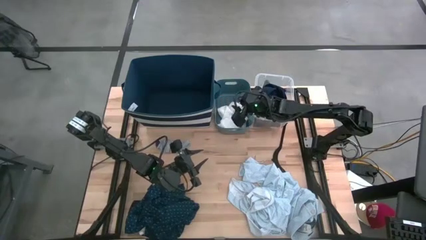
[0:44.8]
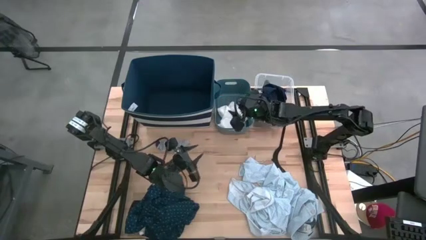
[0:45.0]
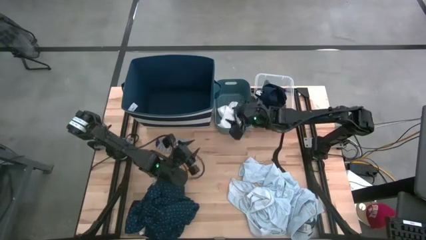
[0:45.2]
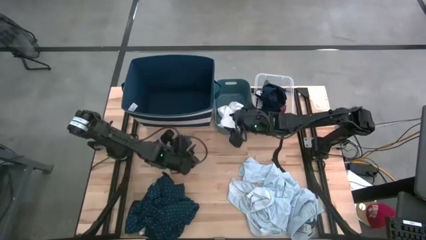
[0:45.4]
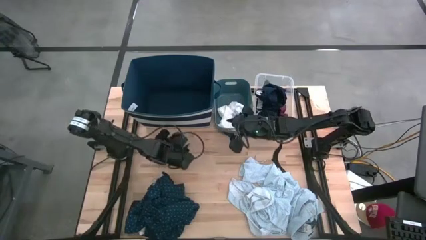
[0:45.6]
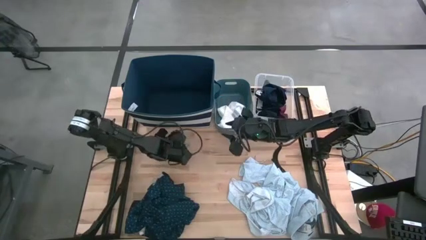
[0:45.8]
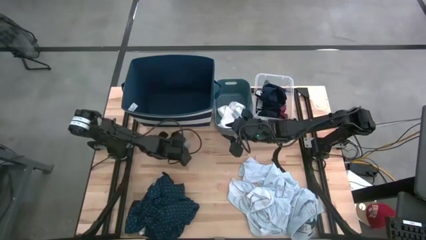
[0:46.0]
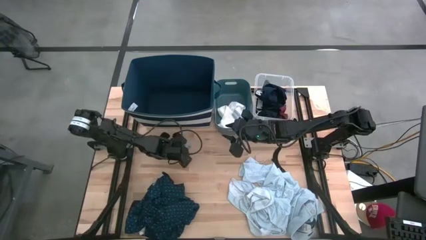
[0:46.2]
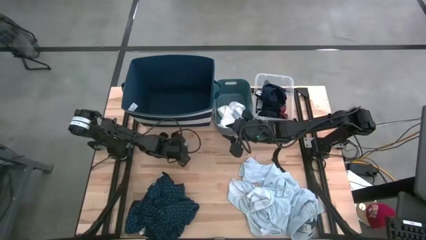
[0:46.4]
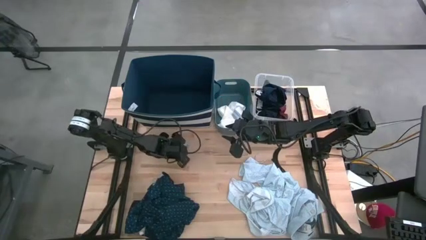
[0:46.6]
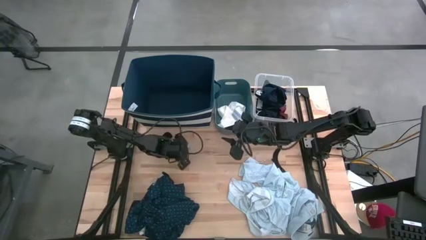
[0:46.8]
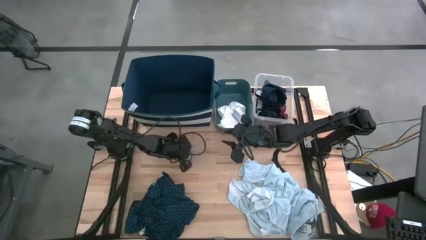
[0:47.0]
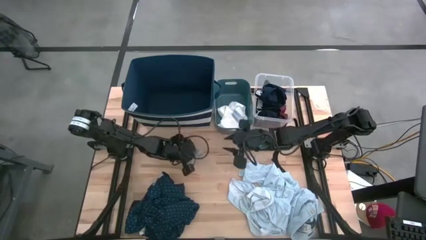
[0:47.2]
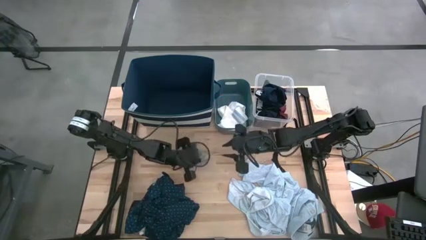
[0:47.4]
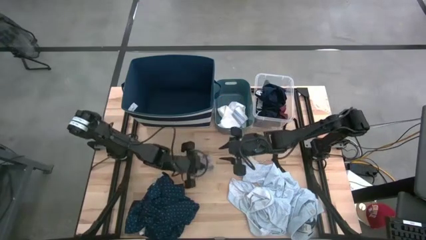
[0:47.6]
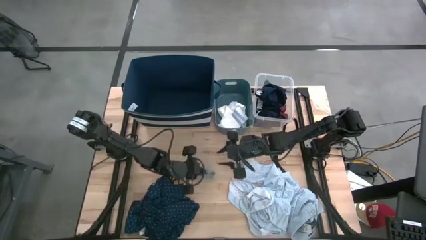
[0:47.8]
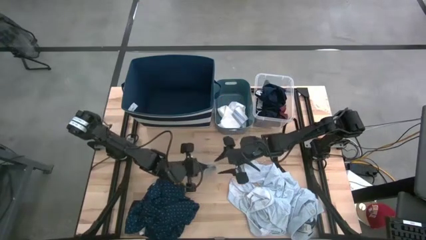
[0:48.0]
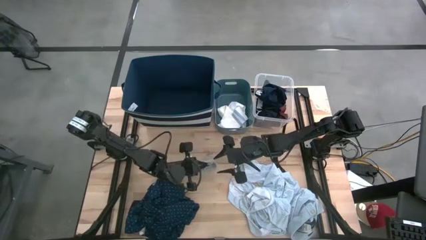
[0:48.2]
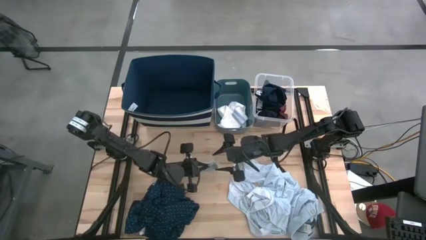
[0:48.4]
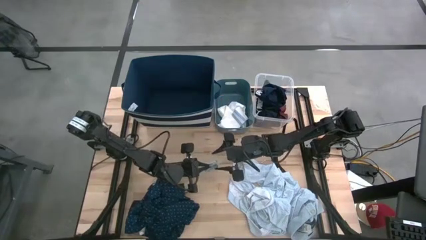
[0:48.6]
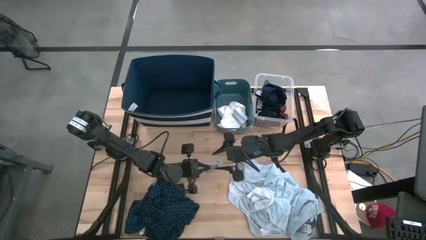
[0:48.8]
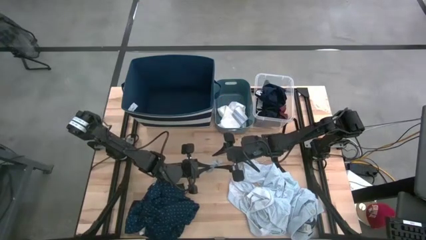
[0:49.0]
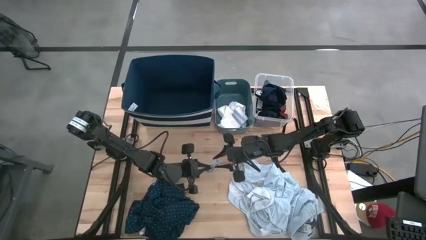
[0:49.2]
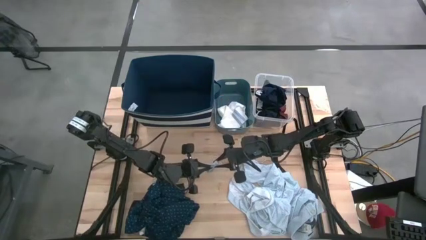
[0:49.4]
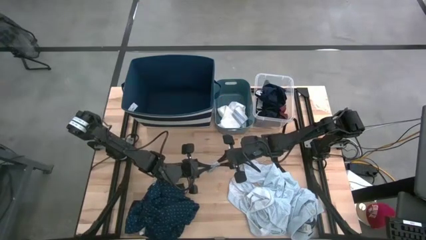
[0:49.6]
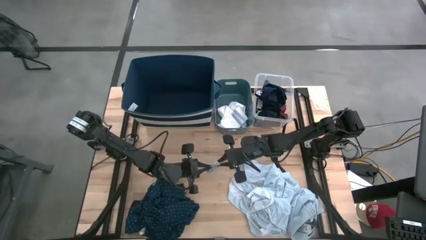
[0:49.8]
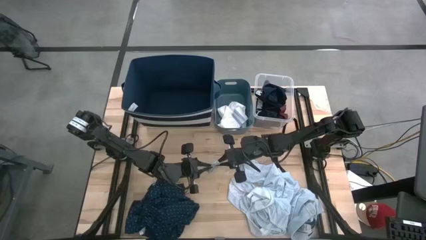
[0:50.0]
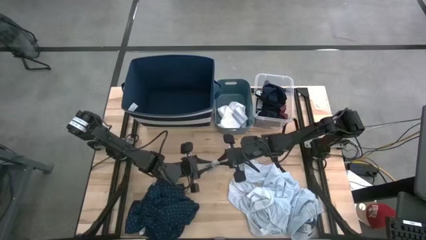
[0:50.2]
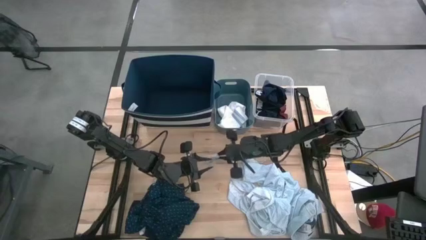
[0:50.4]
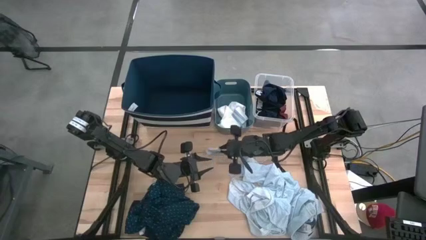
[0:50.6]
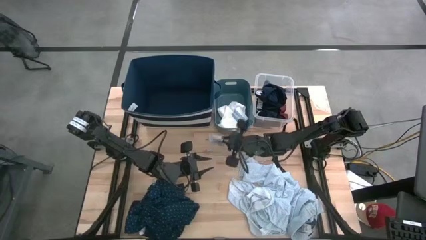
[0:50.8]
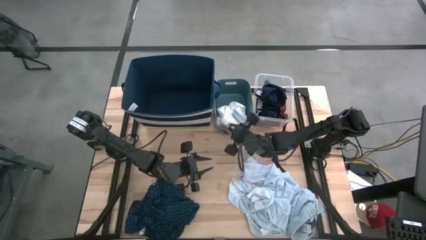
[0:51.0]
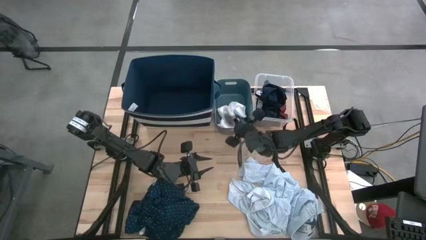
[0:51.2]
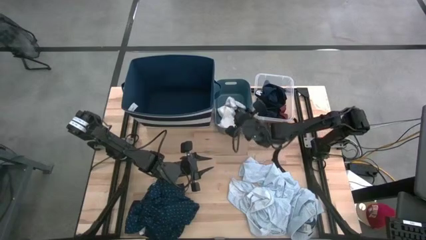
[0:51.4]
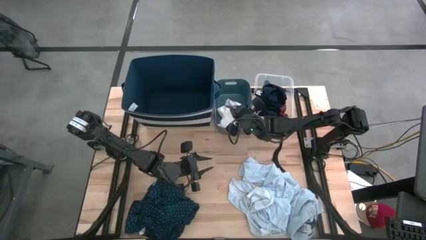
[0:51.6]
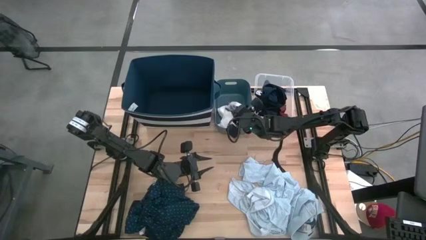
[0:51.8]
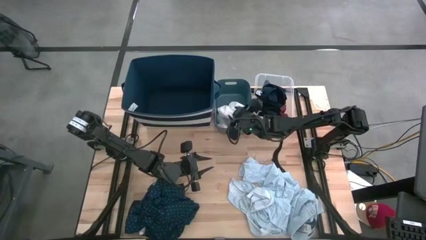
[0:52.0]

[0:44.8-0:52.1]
Task: Pick & Place Cloths
Put the gray and white sock into the green bin

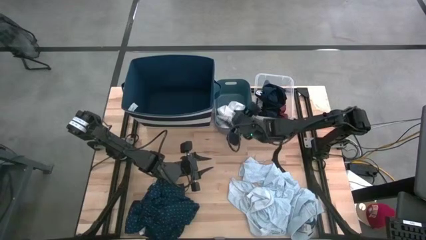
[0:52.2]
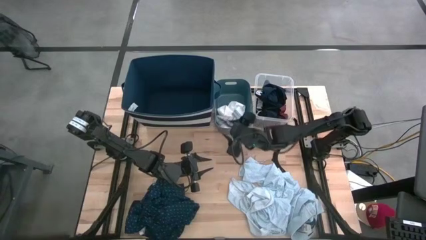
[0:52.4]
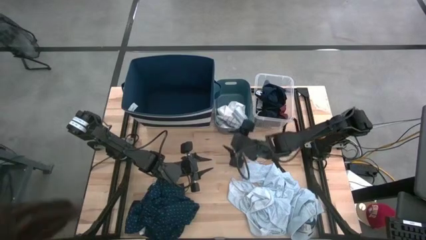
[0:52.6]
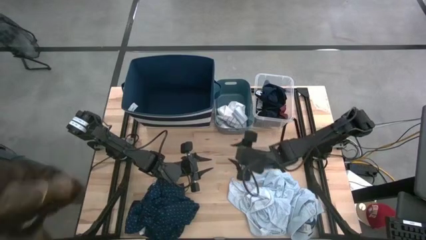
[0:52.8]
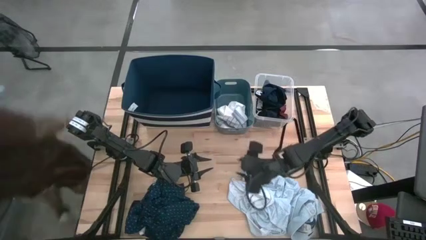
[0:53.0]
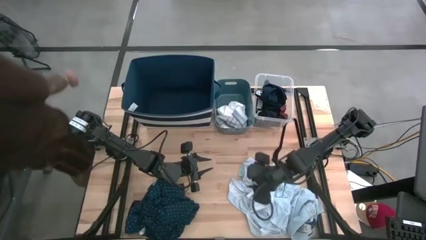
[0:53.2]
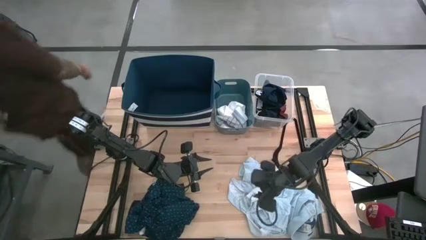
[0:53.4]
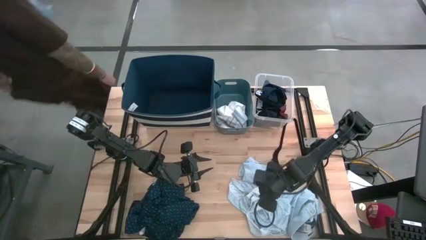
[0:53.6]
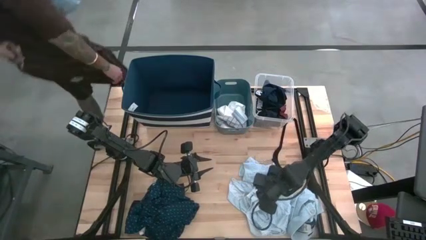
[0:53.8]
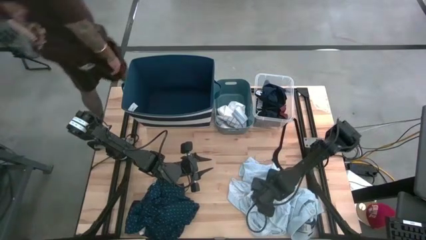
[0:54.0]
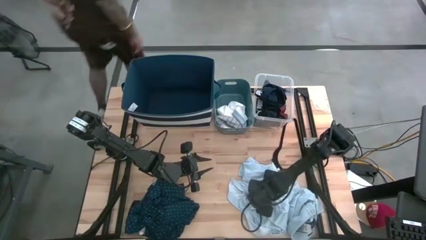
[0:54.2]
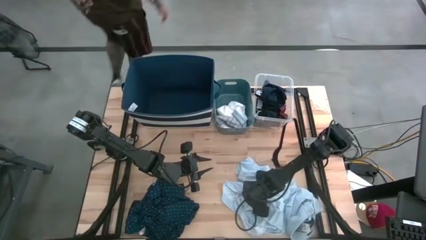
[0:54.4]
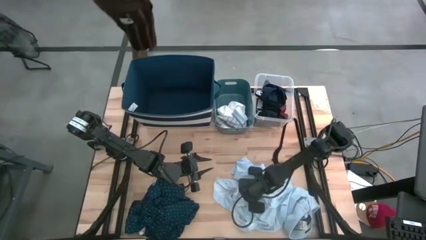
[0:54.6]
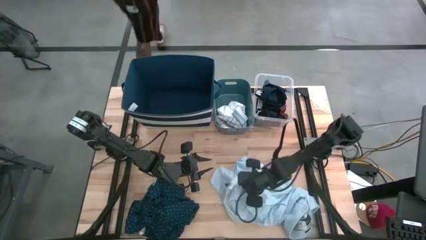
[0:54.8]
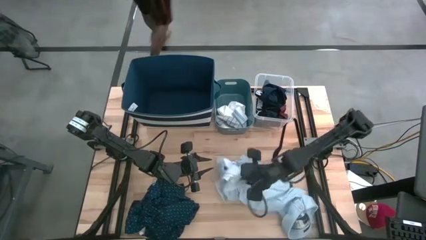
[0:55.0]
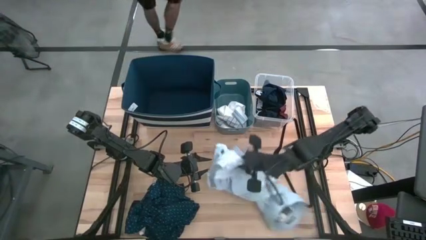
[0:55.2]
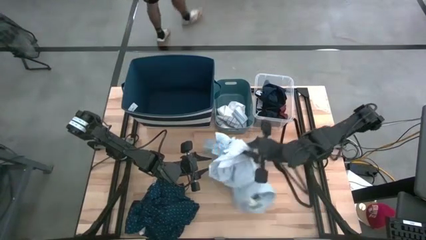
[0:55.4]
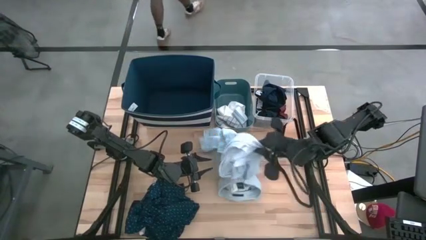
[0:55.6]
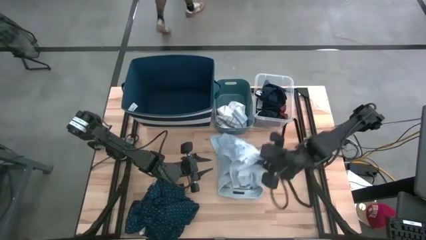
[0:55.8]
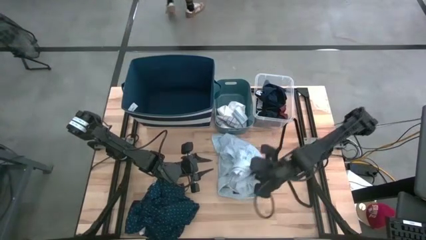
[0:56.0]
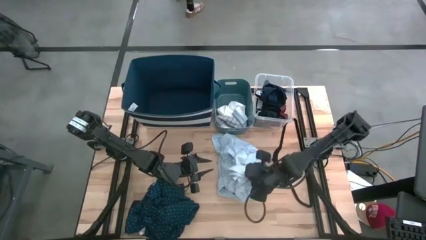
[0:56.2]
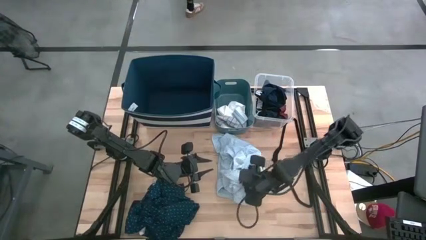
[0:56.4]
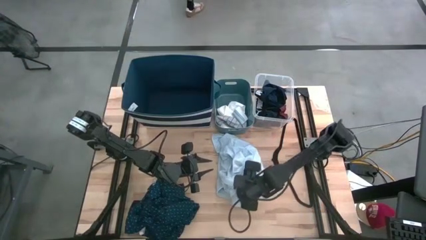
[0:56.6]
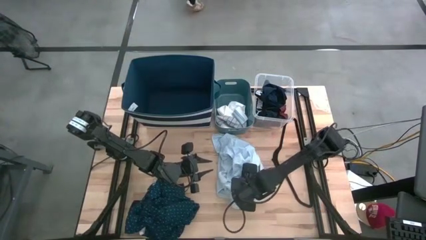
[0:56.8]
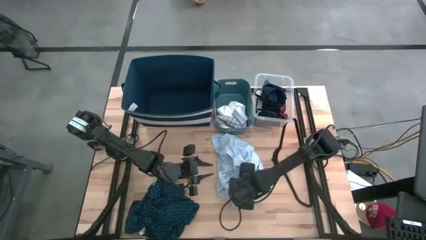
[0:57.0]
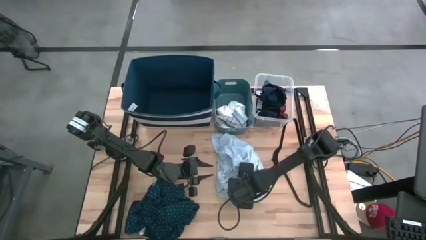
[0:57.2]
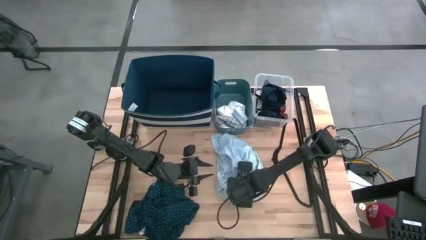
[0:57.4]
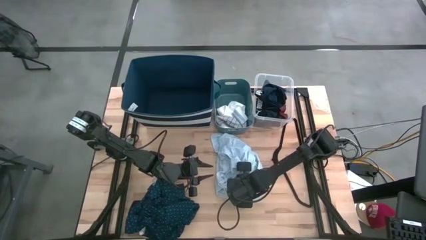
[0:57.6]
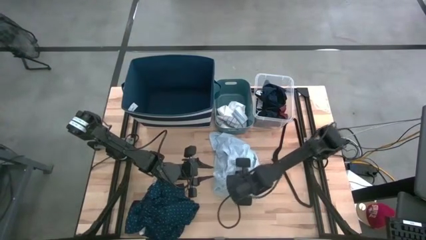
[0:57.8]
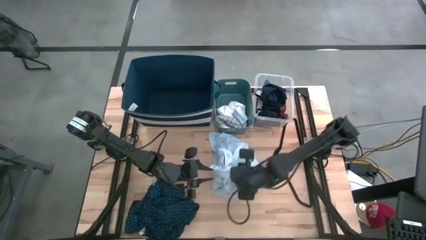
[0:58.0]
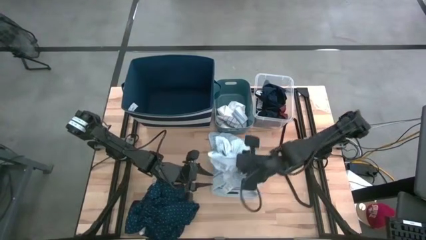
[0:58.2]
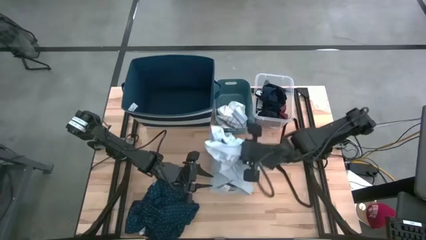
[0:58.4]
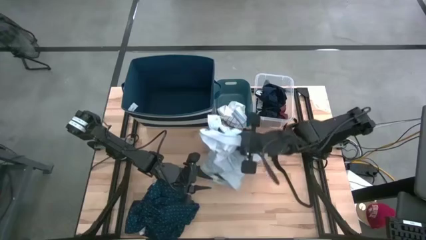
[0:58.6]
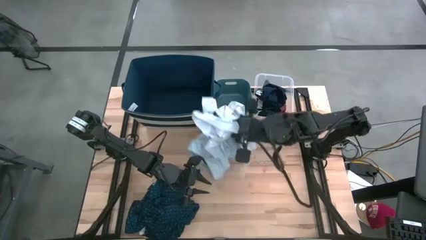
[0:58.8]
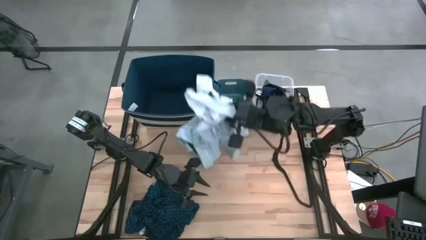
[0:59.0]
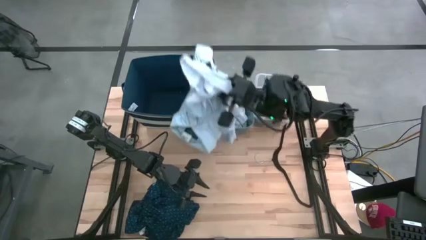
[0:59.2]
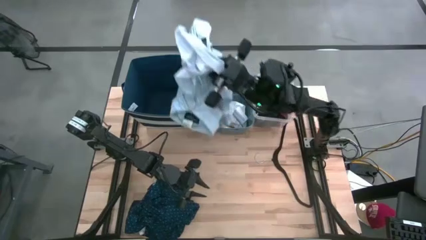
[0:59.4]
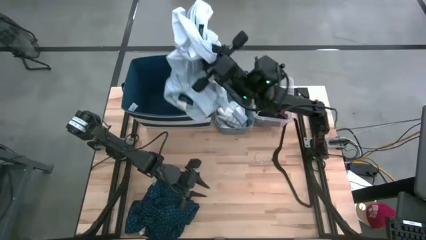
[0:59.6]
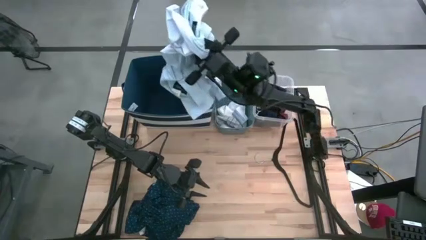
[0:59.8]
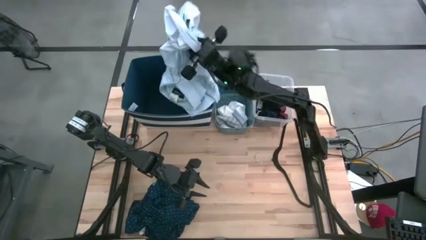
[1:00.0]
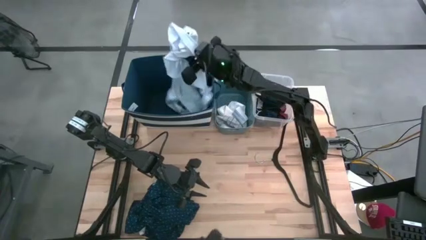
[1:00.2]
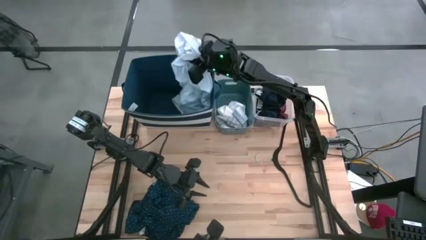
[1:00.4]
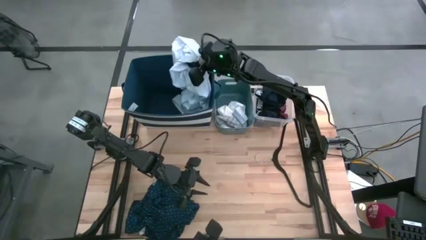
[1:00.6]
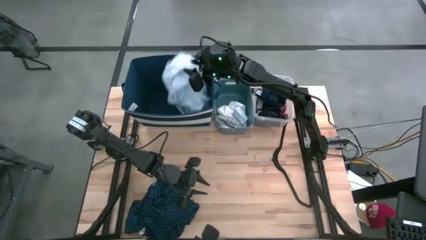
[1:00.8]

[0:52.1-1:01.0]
Put the blue shirt into the blue laundry organizer
